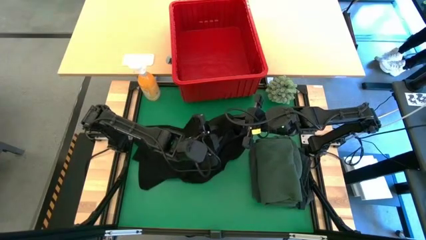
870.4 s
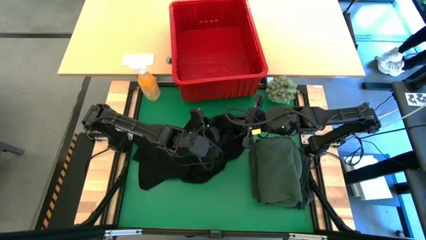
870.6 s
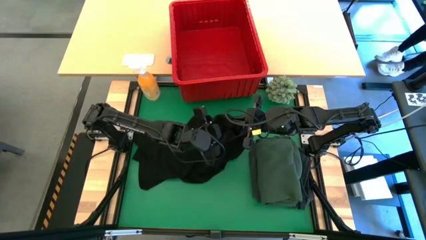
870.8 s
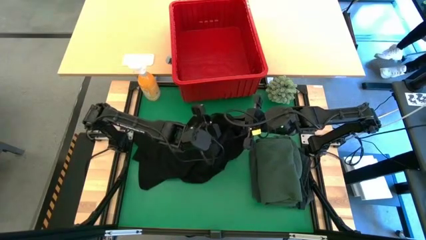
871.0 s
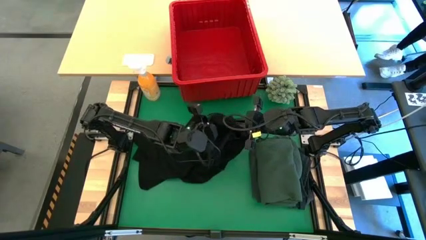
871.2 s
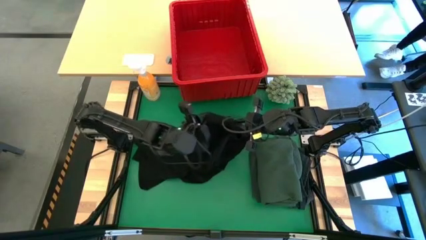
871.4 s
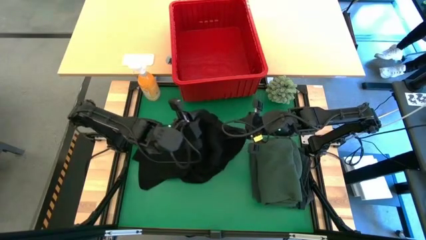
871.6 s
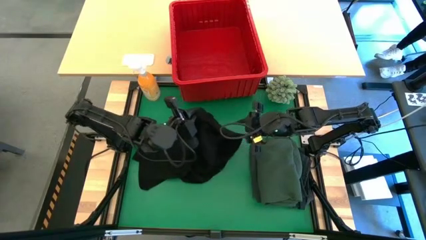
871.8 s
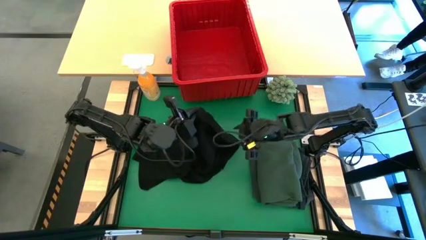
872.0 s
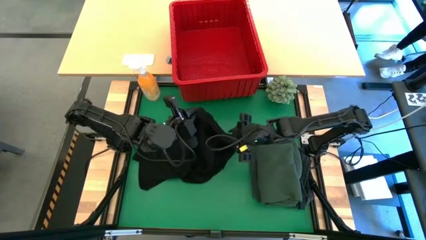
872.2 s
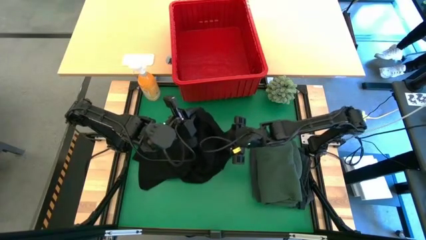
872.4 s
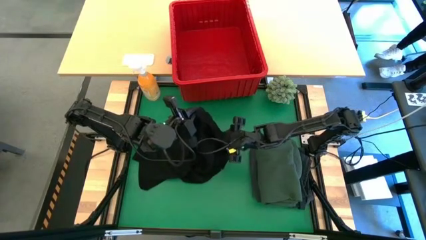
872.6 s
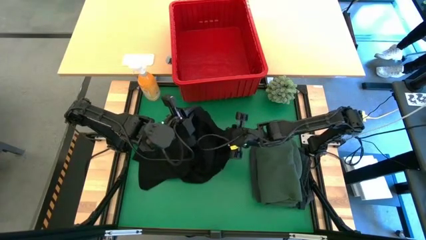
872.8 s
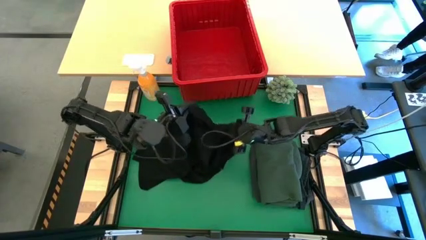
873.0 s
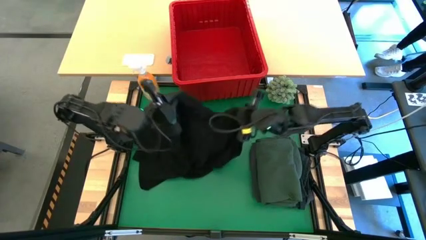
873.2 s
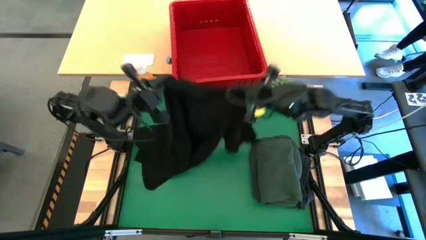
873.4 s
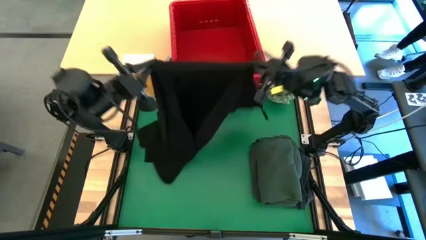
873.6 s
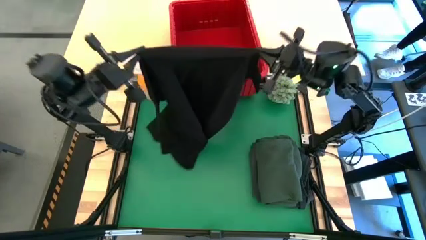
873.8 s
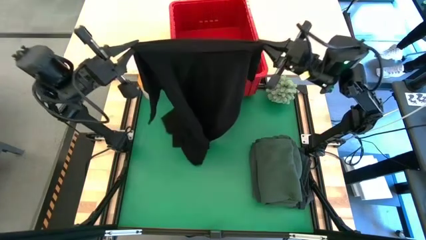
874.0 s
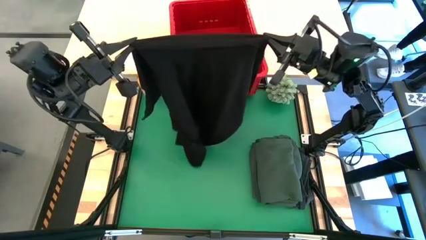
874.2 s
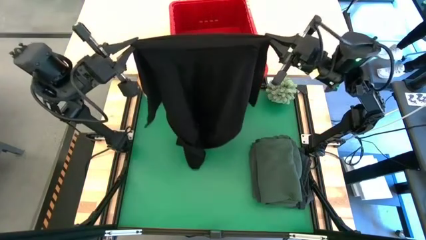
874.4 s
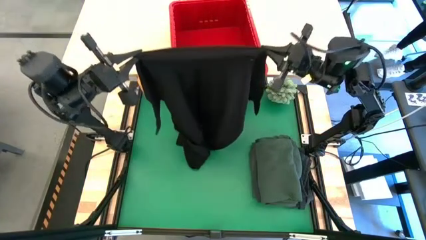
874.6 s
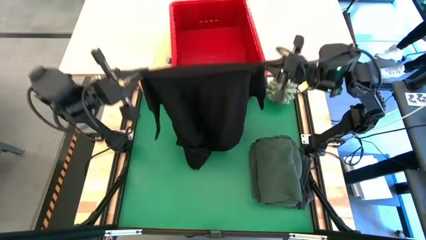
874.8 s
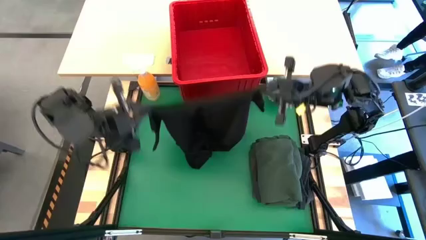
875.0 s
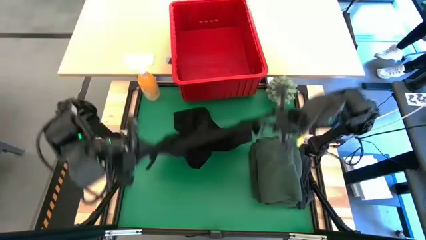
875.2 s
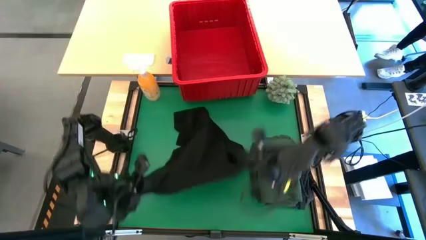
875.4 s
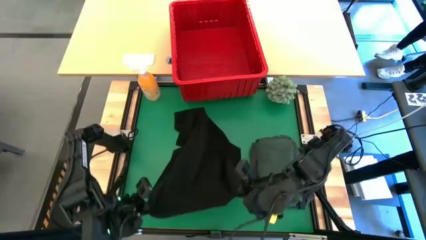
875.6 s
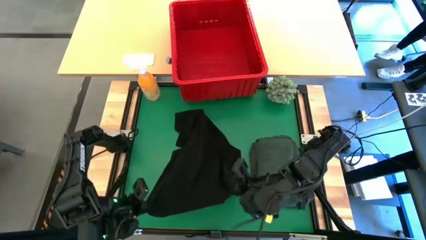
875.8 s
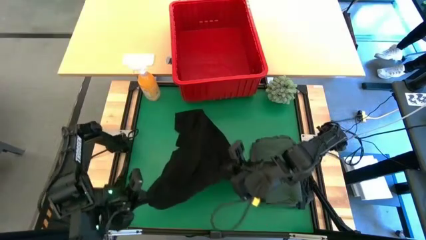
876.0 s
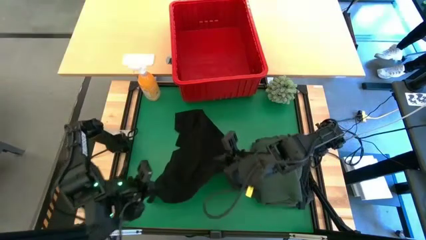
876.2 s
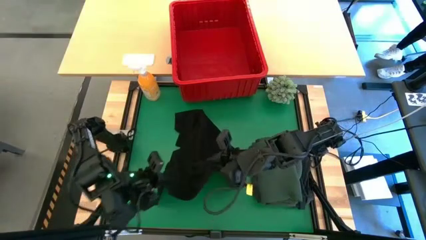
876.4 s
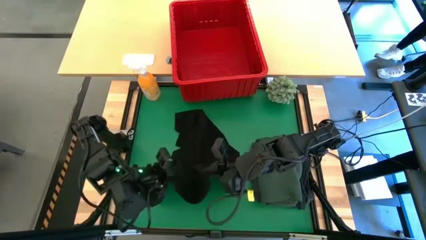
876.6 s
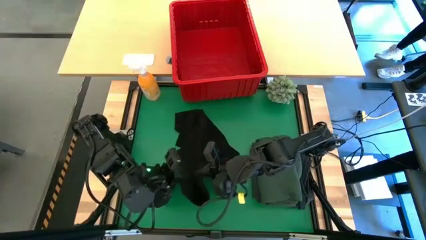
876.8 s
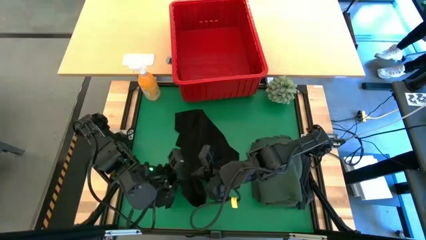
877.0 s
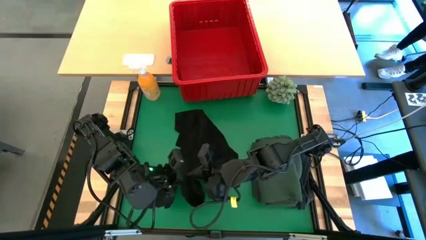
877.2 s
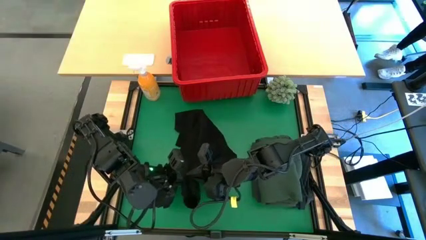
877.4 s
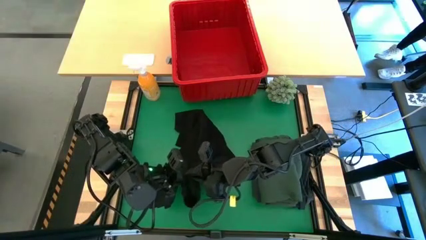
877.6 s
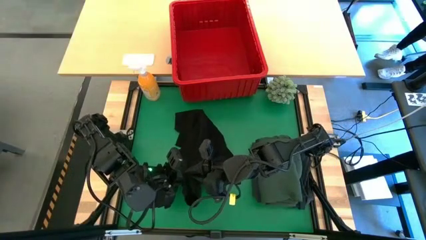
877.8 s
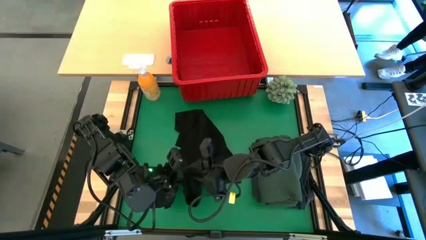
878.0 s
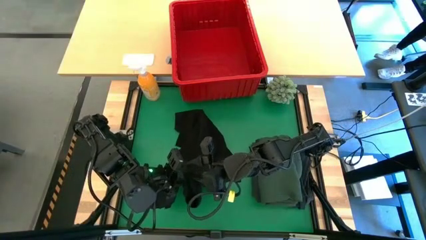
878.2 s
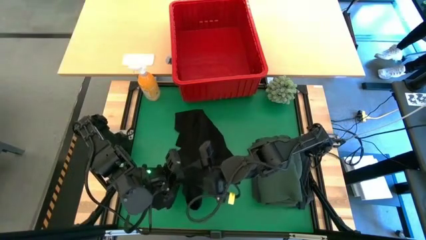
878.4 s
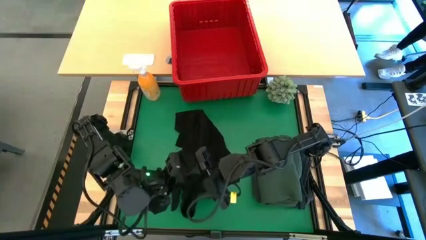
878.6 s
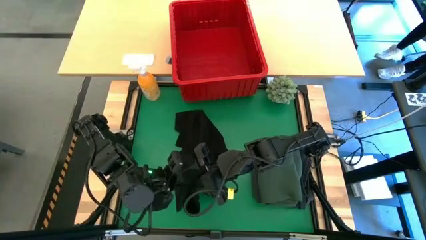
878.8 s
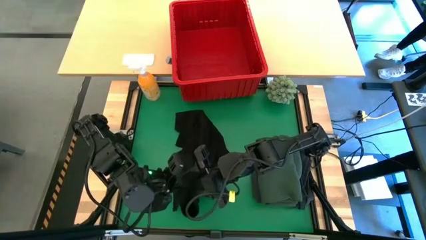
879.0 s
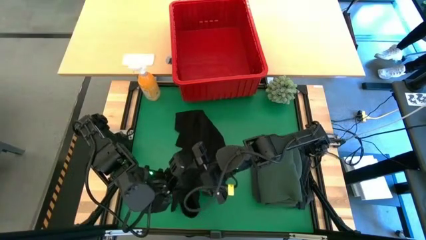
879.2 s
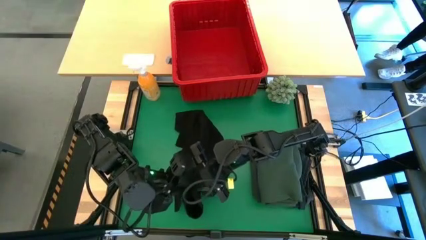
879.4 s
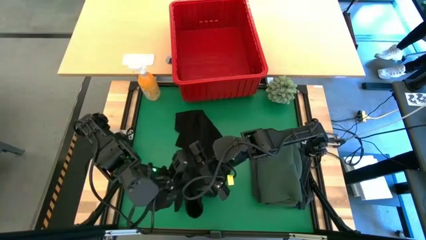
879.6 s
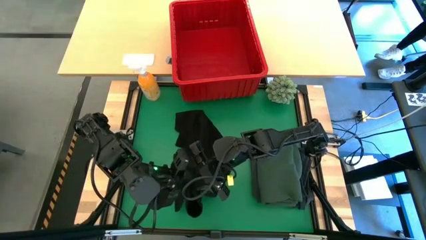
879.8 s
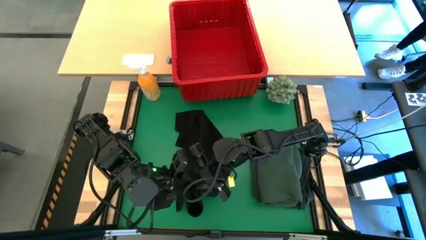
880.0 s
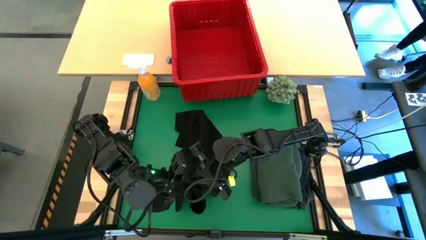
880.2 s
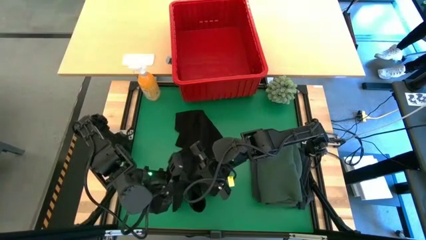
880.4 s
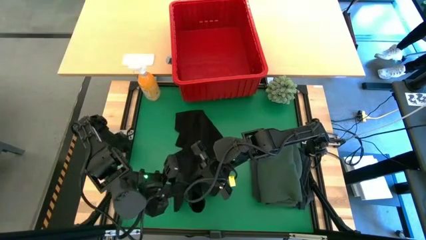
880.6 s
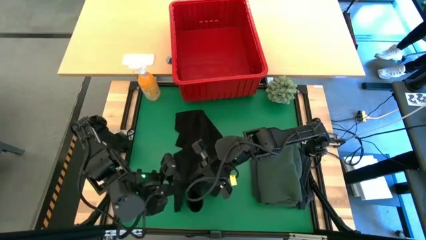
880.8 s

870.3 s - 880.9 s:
Task: Fold Laundry from Bin
Fold the black shirt

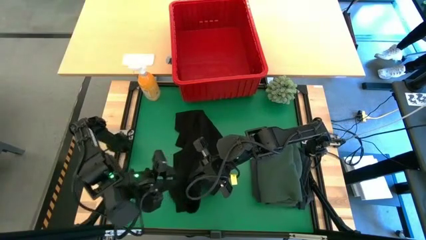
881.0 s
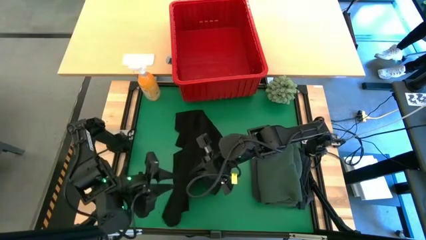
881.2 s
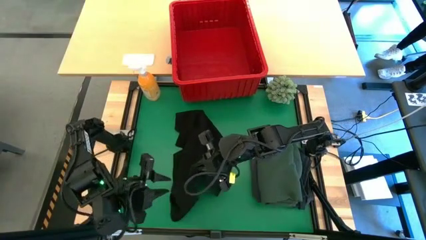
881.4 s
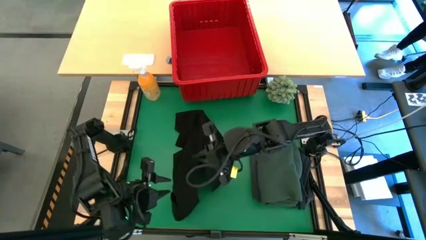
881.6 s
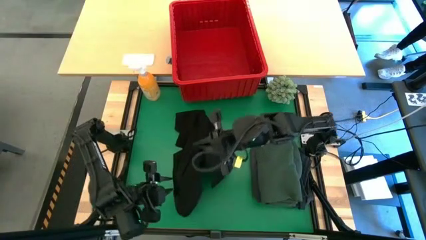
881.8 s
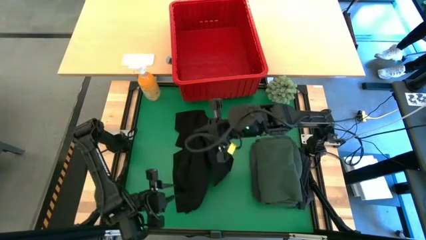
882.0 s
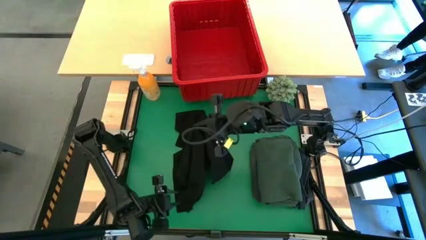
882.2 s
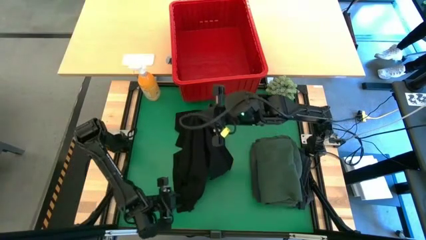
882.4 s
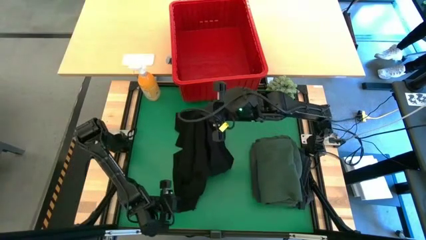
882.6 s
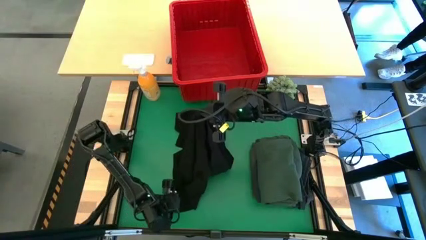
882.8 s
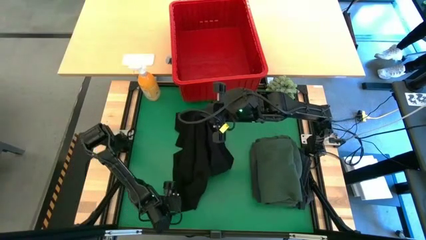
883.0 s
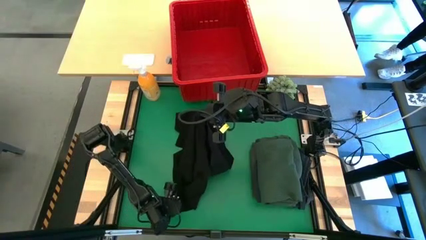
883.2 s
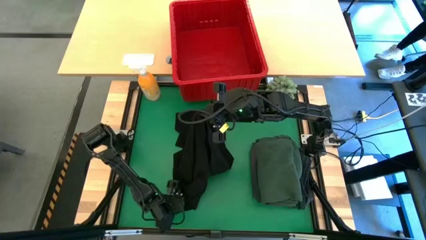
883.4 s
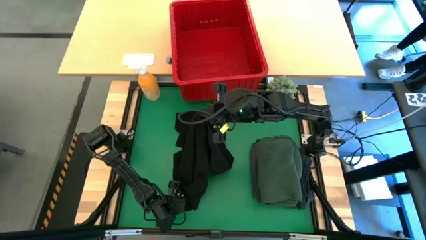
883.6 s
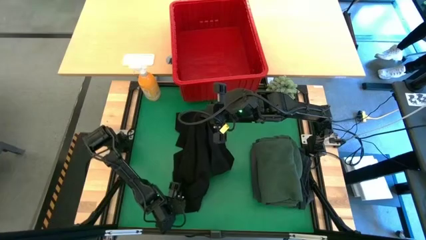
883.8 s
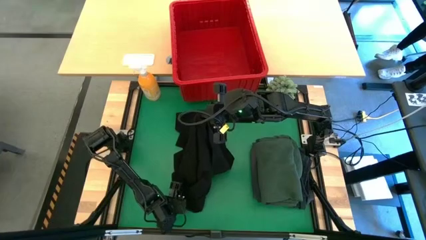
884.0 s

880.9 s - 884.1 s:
Fold the black shirt

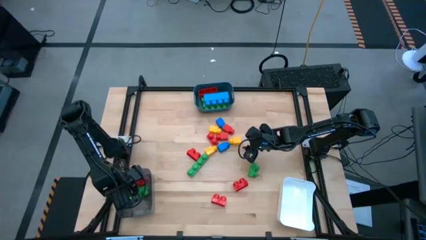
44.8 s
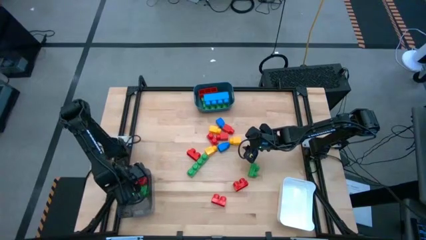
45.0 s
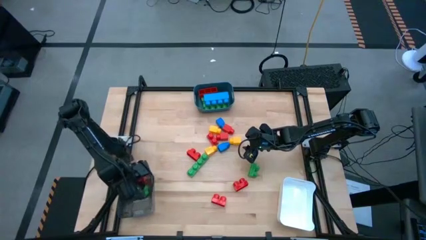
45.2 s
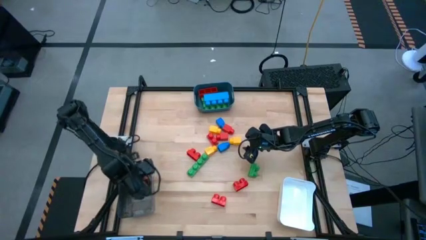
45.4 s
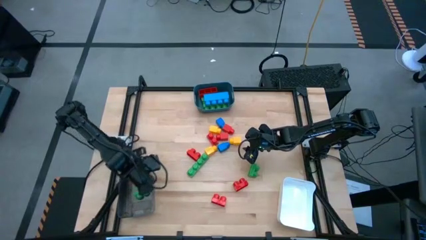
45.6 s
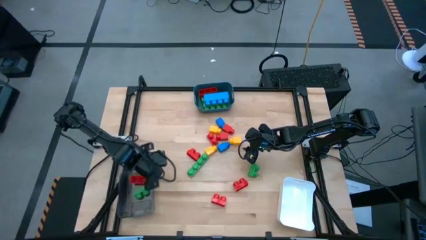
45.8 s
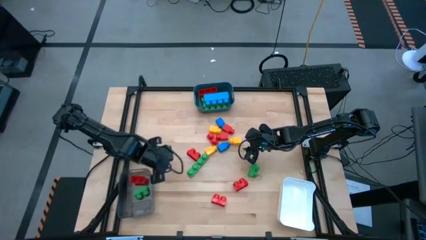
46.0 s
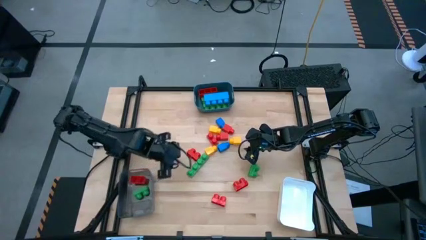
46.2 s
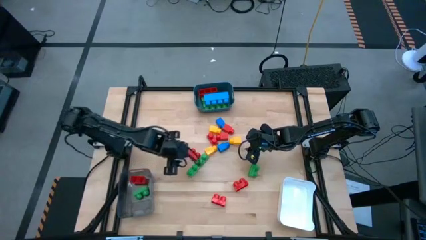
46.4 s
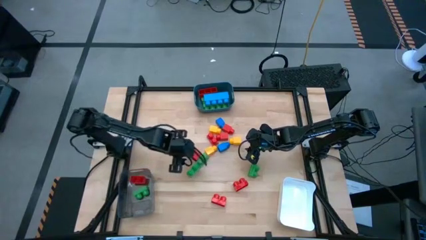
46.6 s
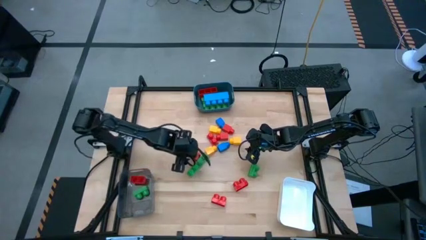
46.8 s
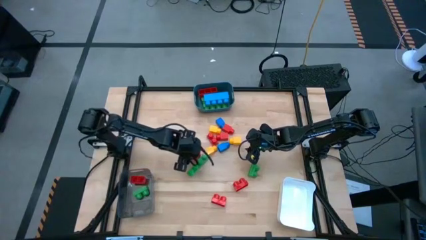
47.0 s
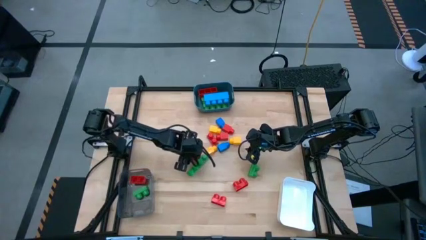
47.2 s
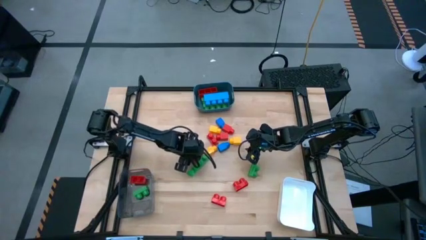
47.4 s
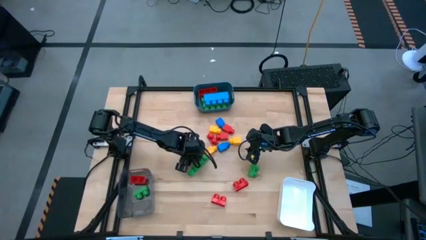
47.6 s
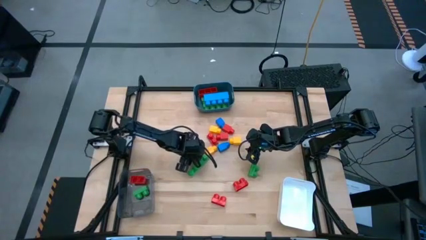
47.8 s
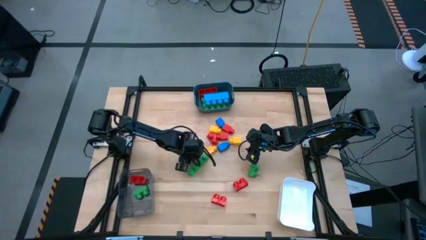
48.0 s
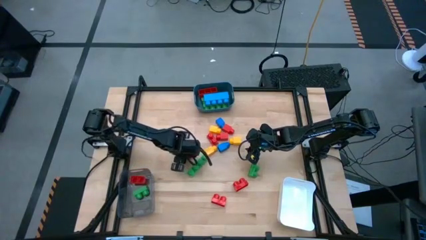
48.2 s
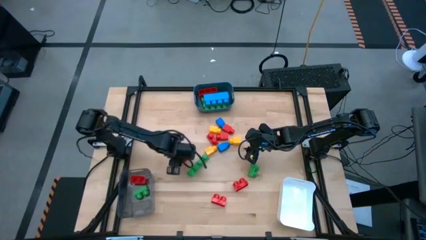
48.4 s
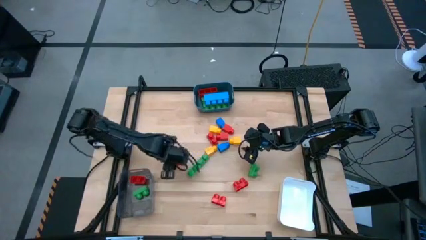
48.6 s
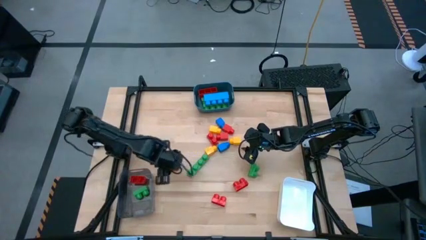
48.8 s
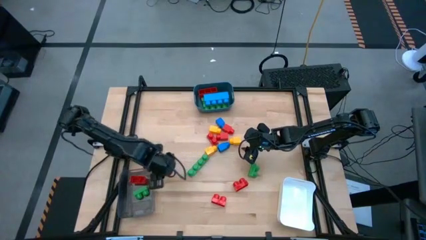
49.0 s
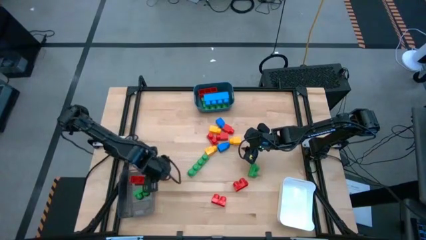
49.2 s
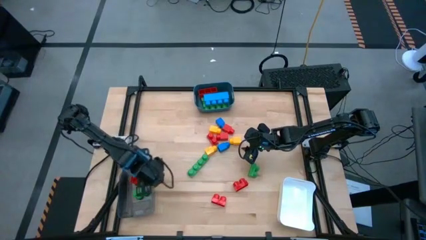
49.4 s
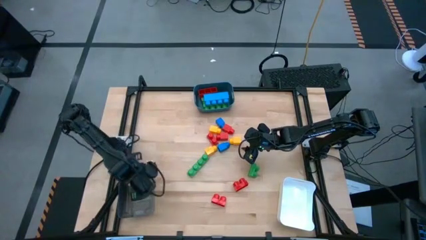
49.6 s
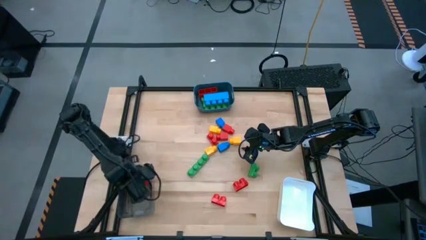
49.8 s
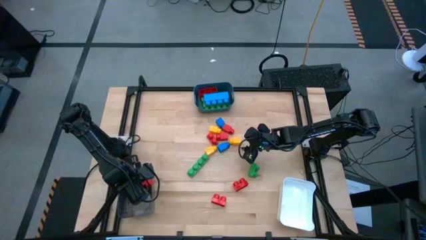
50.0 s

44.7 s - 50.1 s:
Task: Sort blocks by size
Put the red game piece into the grey container
